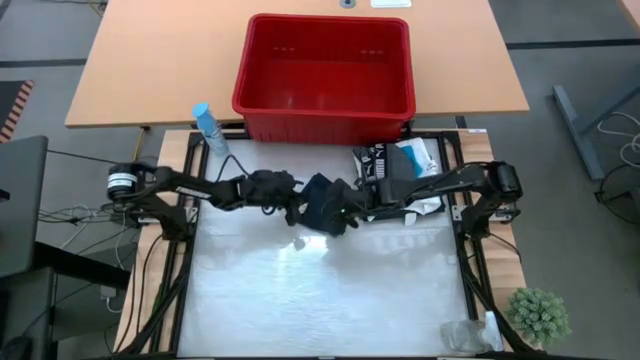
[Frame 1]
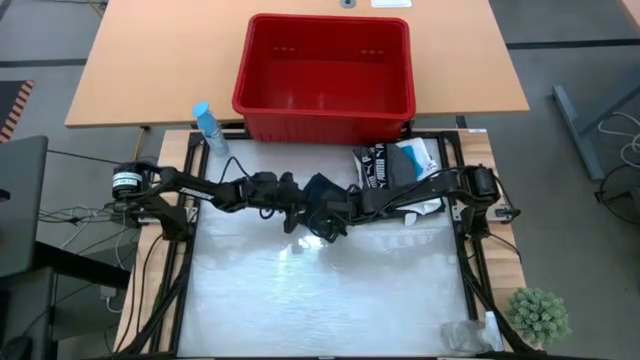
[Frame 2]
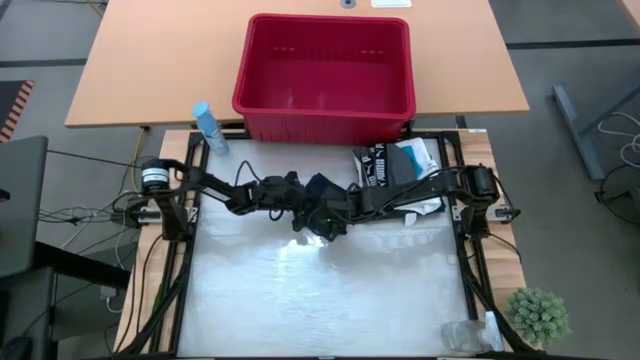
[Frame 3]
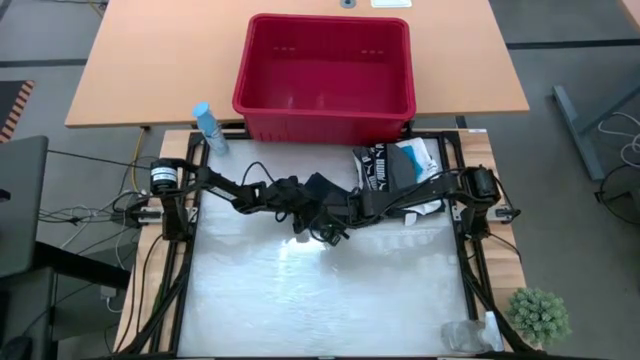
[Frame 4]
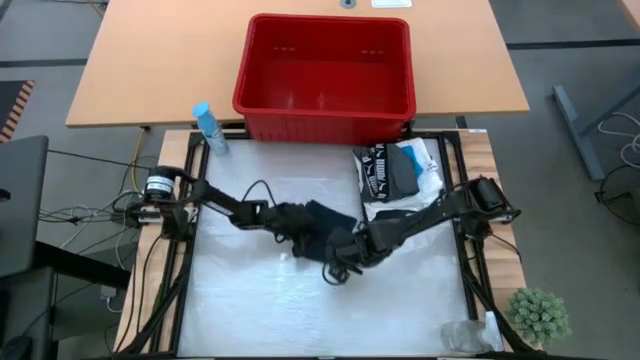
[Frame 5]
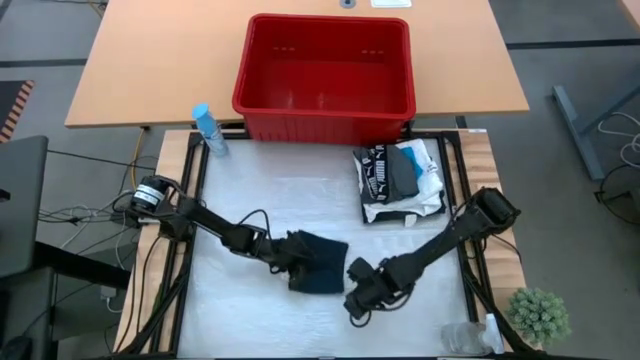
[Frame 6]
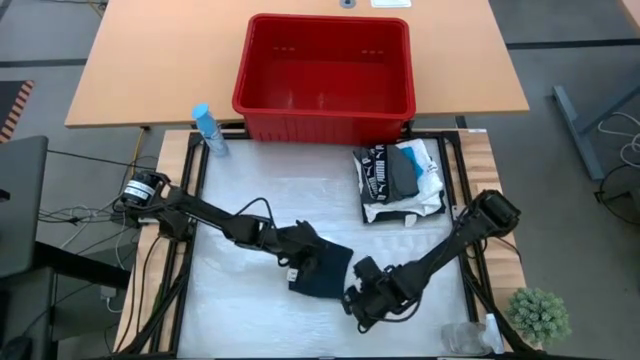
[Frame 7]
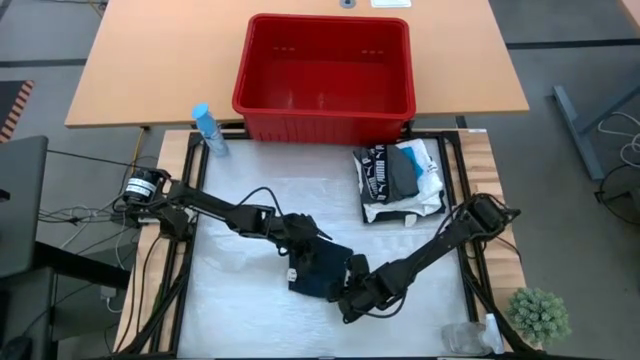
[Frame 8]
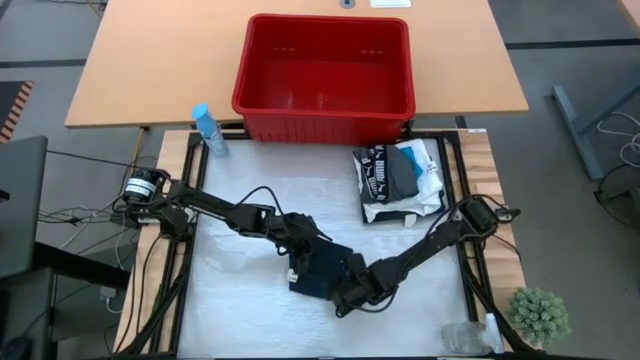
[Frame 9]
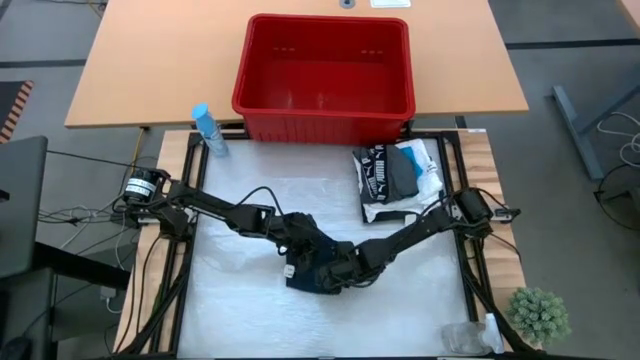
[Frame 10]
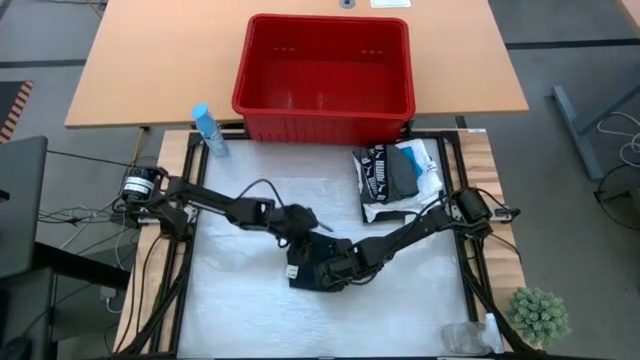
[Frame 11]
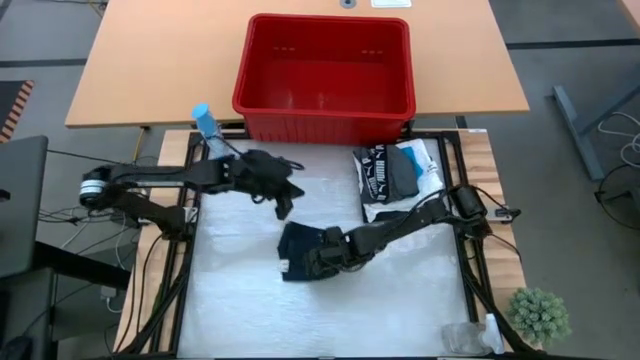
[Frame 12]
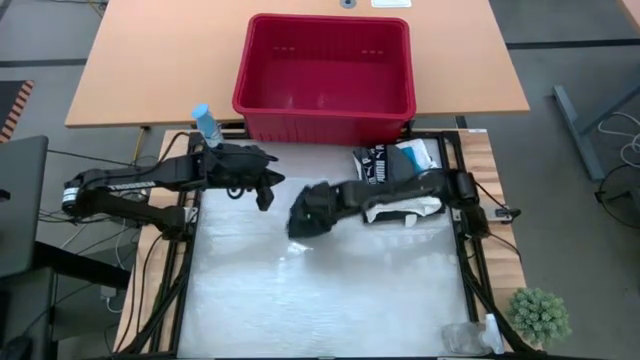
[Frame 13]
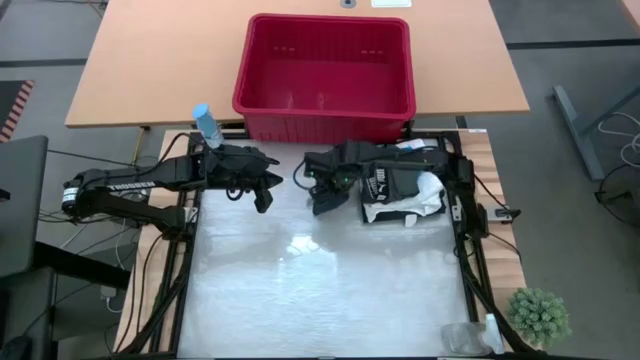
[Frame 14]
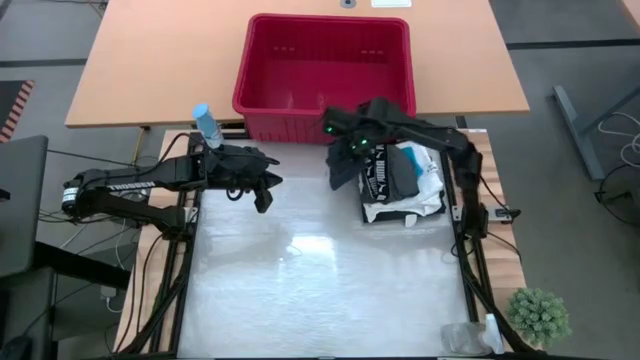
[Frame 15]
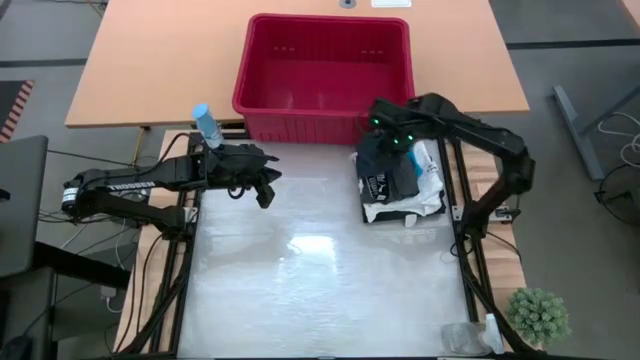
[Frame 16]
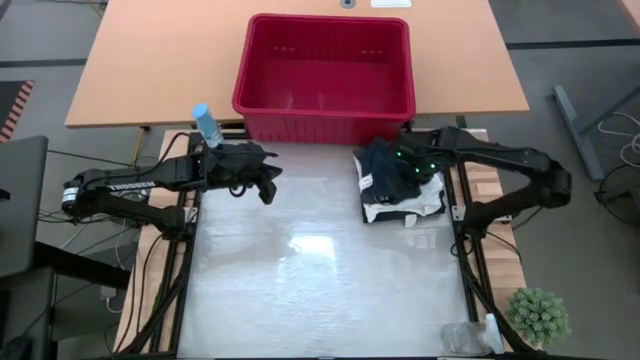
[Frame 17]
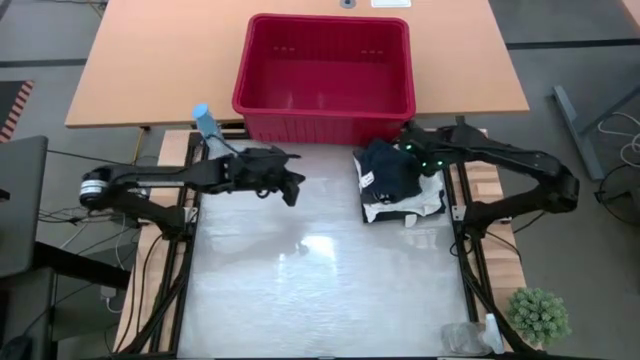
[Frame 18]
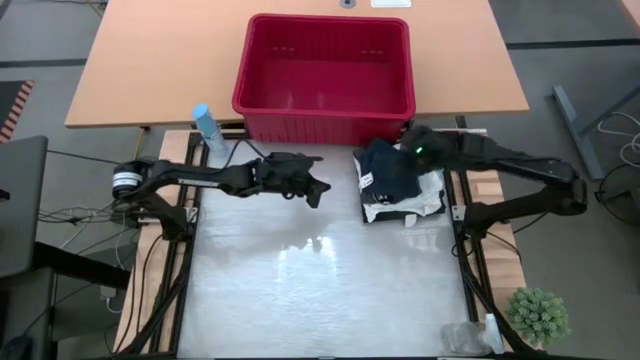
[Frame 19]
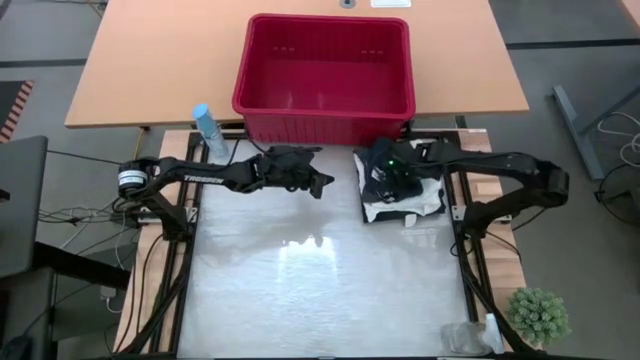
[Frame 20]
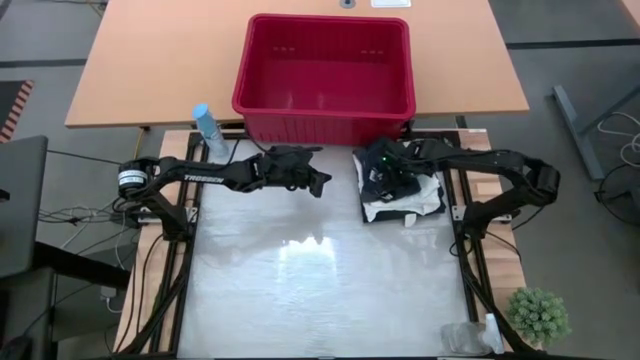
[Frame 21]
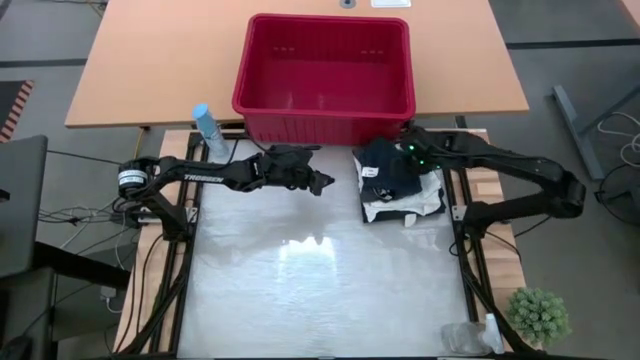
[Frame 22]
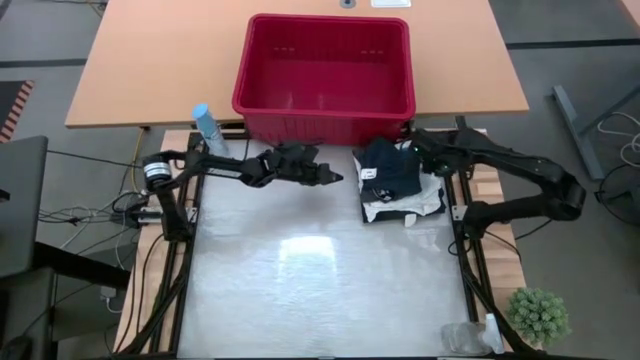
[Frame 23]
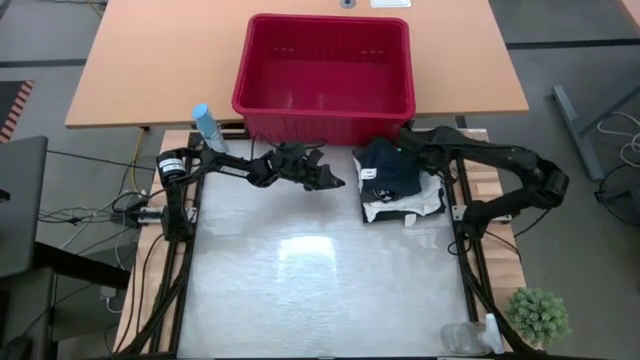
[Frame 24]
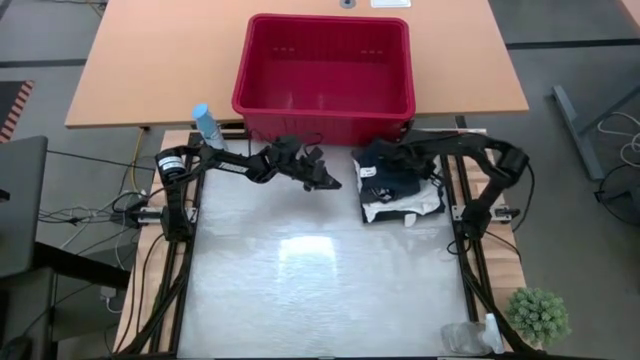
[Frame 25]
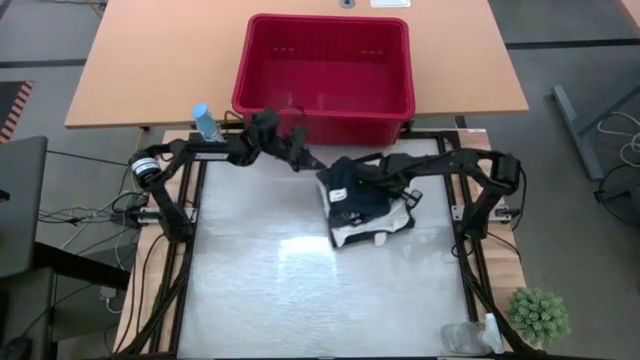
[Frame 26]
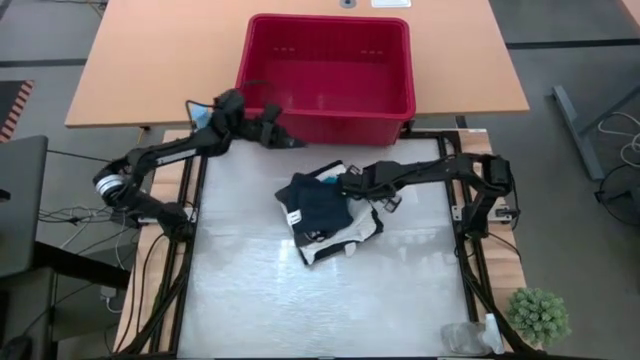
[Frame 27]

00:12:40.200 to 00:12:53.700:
Task: Fold laundry
Stack the black shorts on the gray boxers

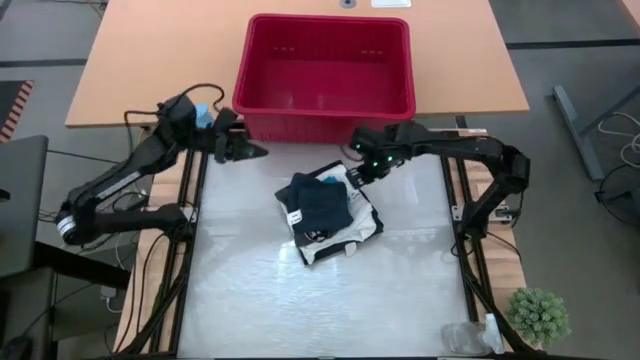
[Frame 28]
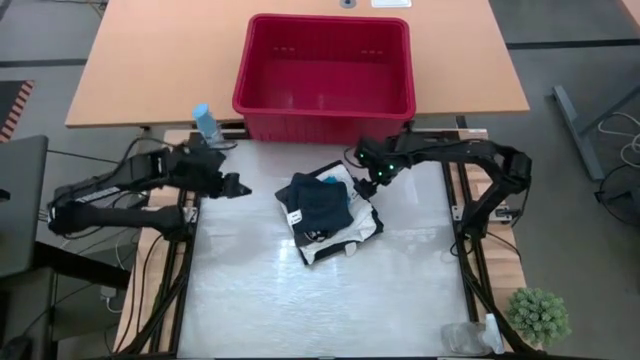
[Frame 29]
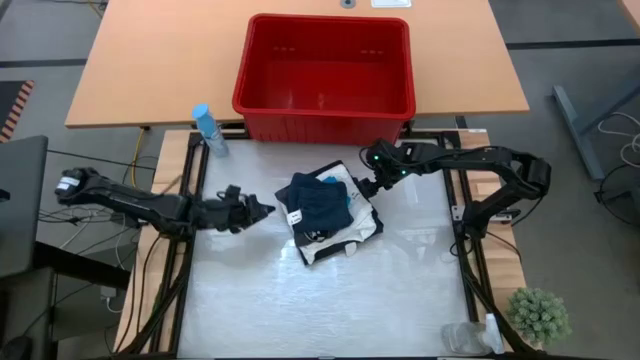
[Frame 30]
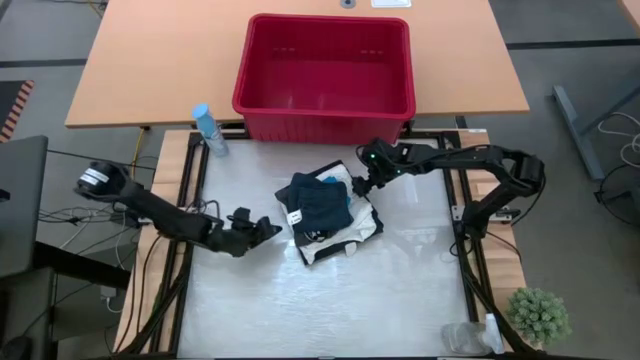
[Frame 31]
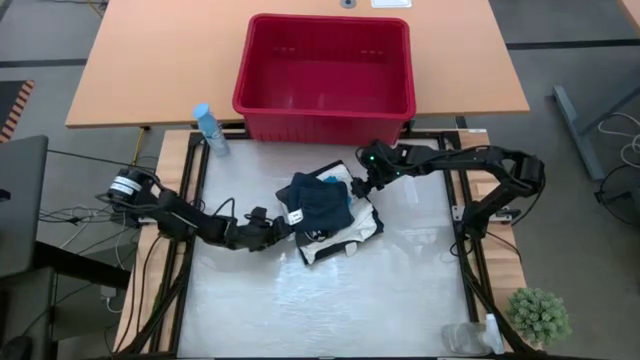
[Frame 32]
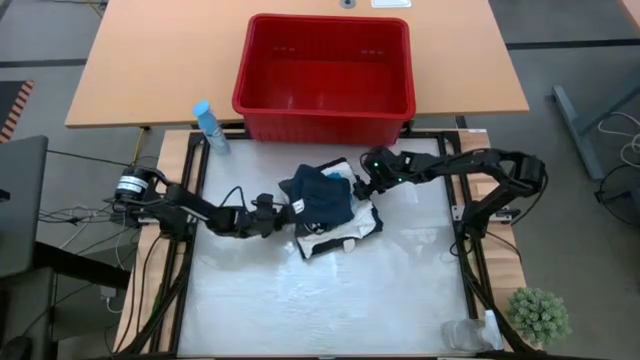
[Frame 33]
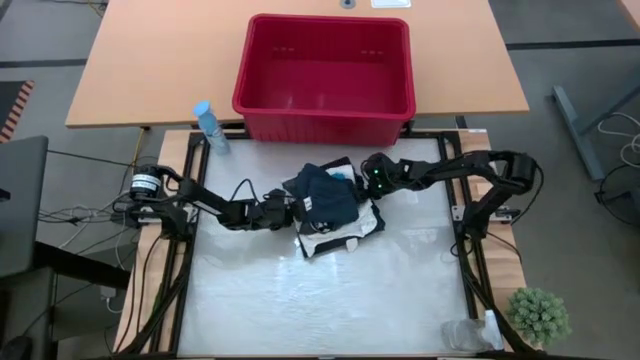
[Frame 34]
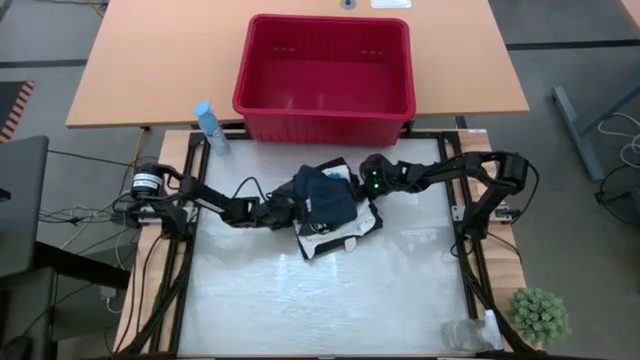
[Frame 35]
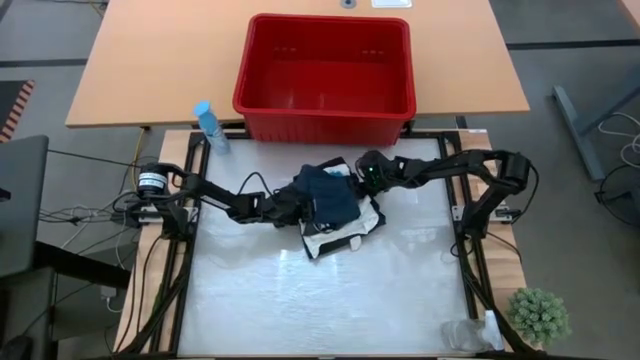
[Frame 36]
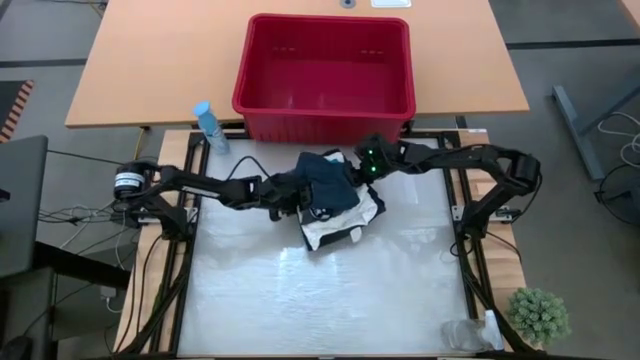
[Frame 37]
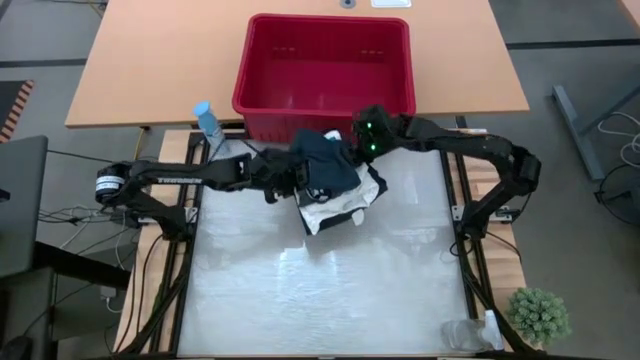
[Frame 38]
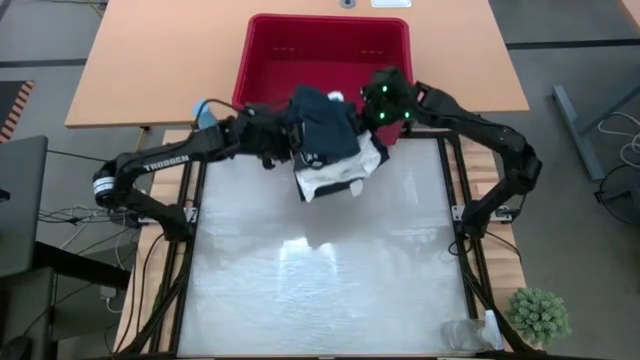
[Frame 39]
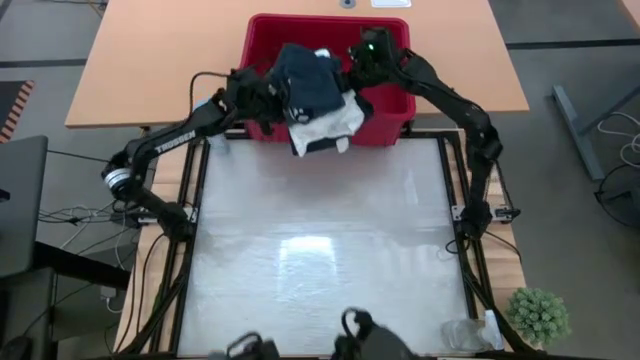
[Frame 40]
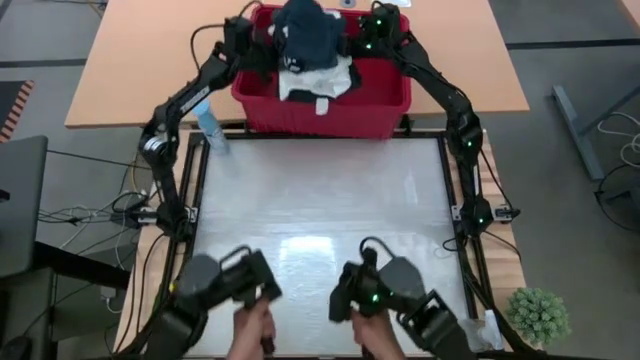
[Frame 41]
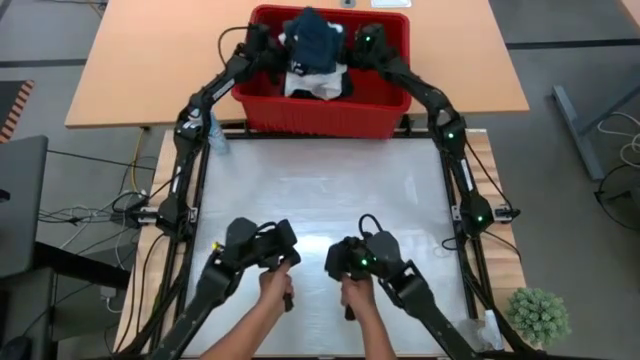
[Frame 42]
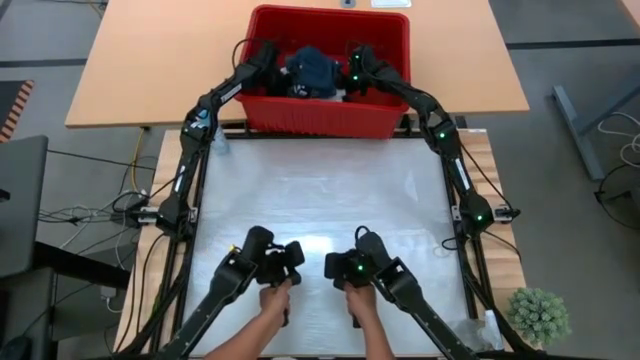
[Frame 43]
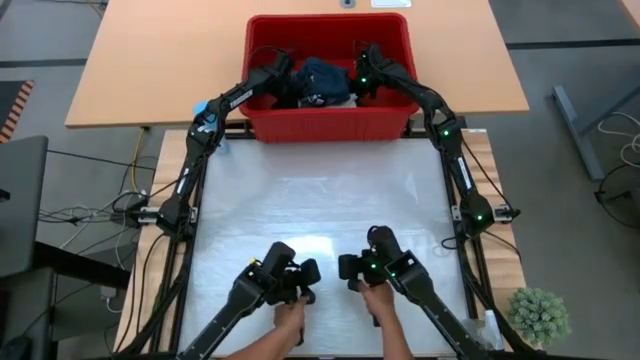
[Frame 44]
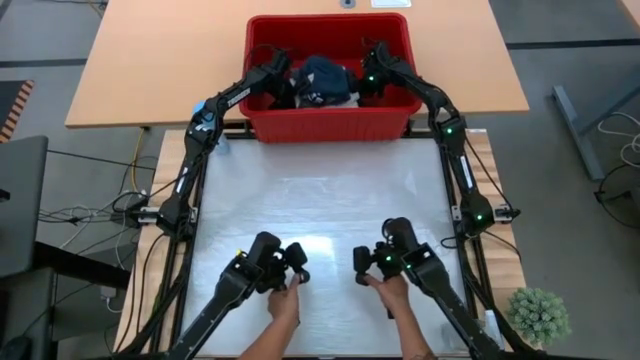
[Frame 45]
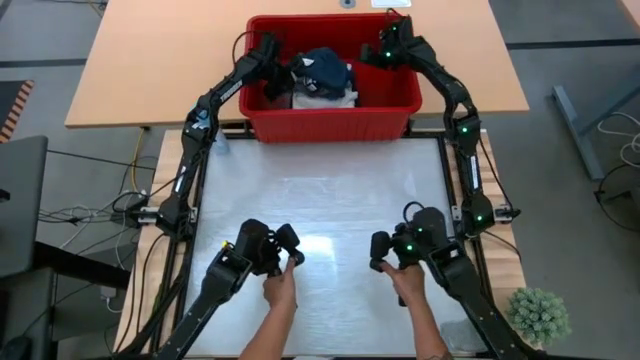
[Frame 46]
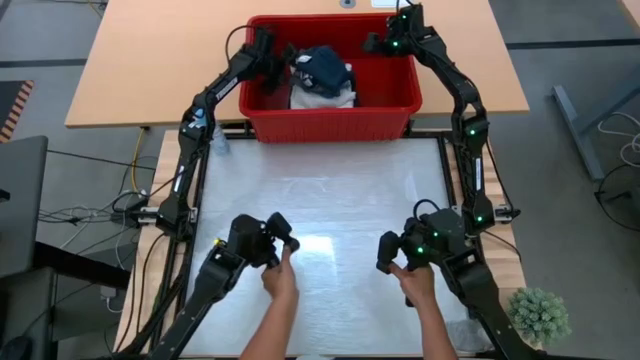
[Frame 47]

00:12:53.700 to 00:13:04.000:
Put the stacked clothes into the red bin
